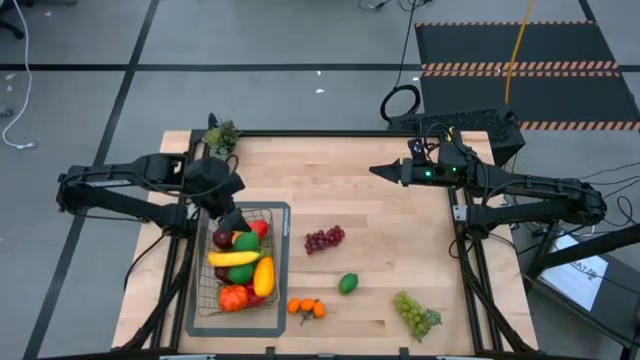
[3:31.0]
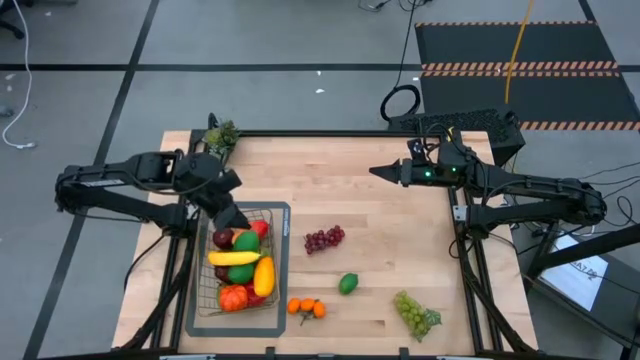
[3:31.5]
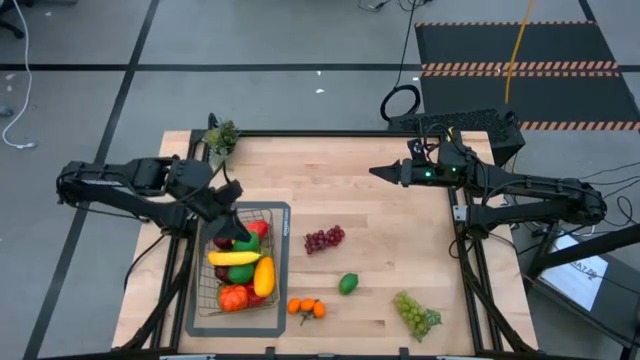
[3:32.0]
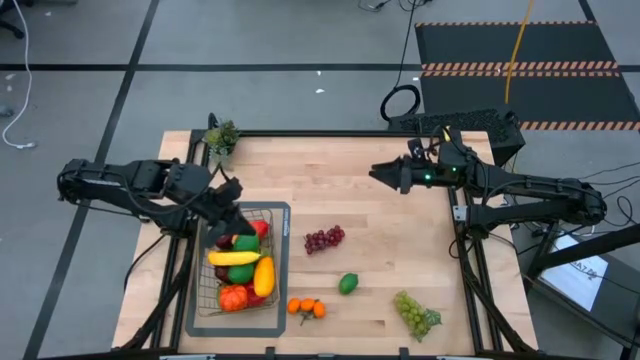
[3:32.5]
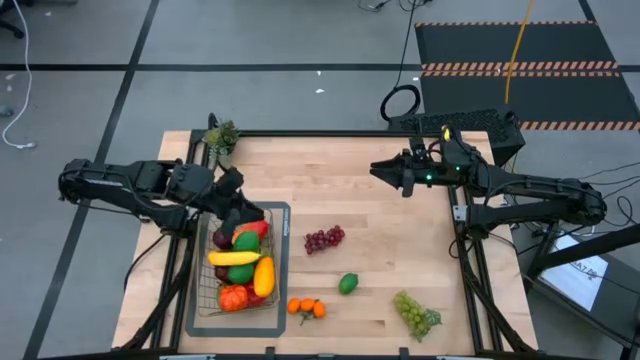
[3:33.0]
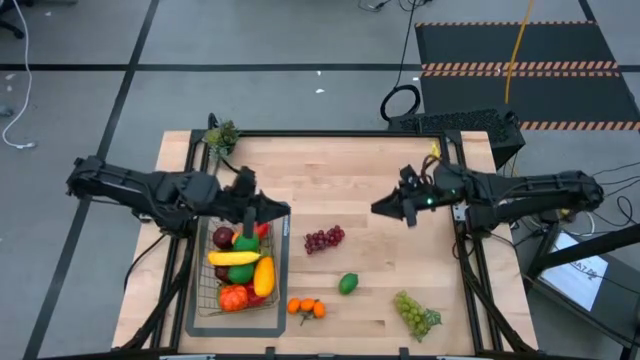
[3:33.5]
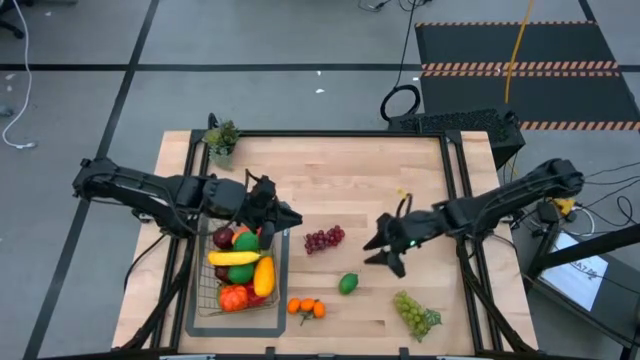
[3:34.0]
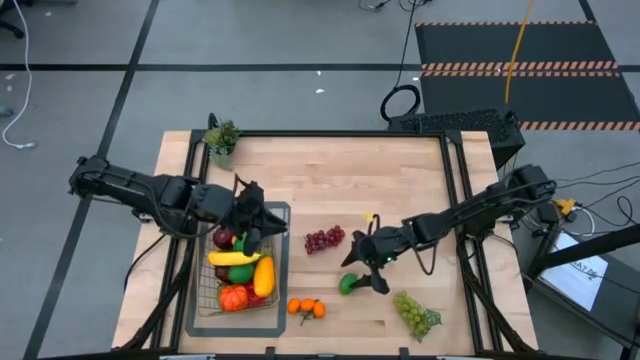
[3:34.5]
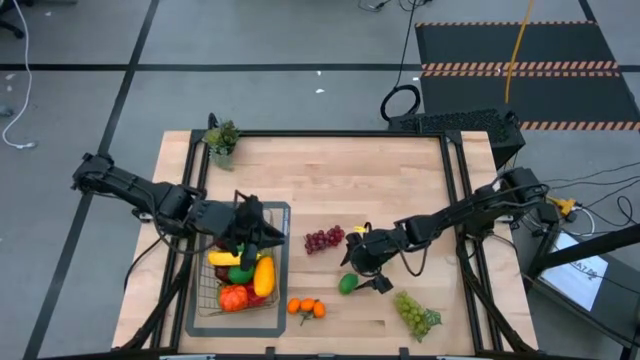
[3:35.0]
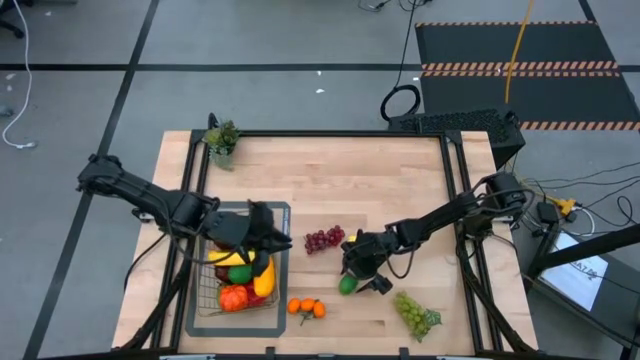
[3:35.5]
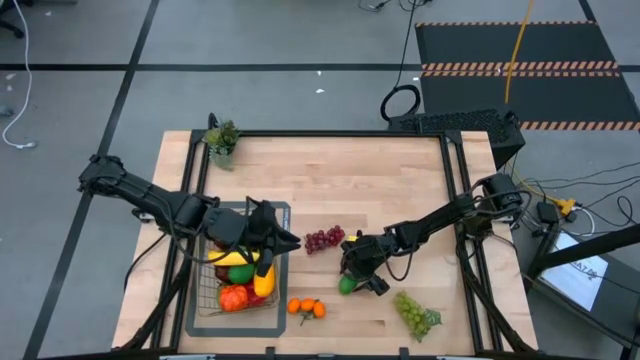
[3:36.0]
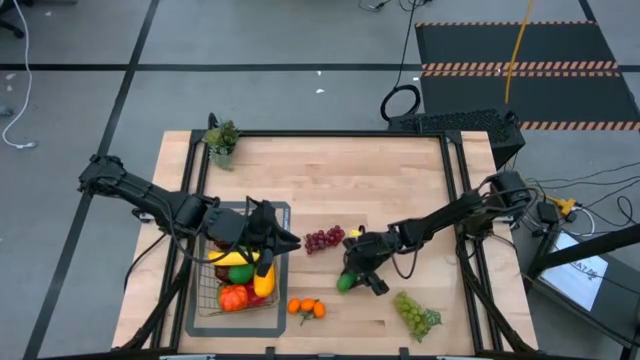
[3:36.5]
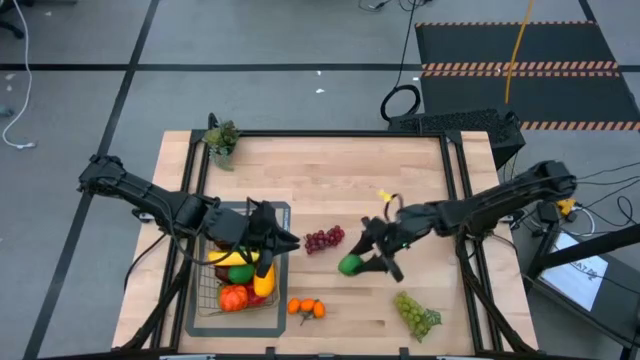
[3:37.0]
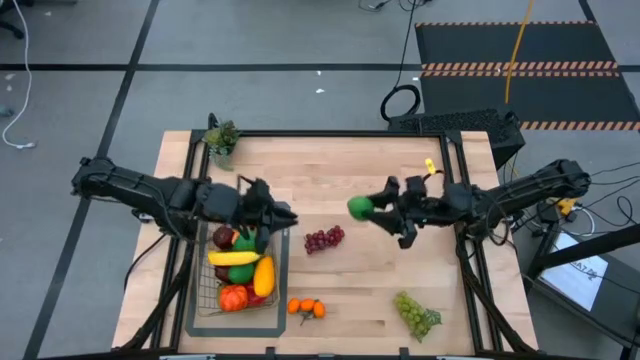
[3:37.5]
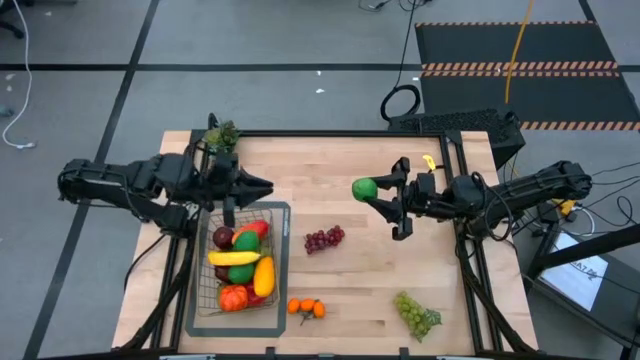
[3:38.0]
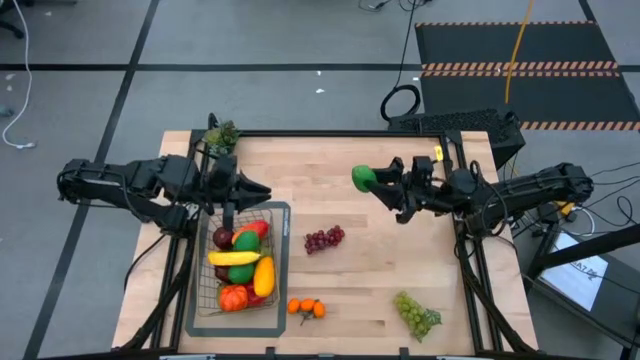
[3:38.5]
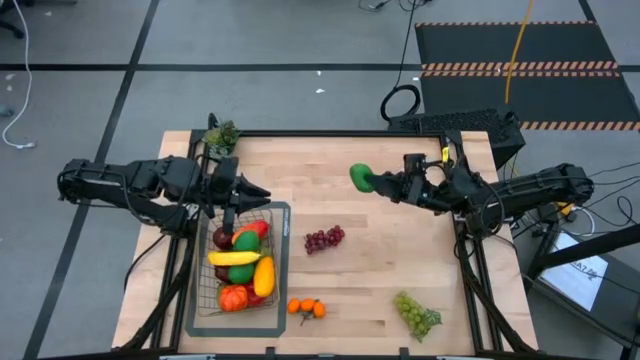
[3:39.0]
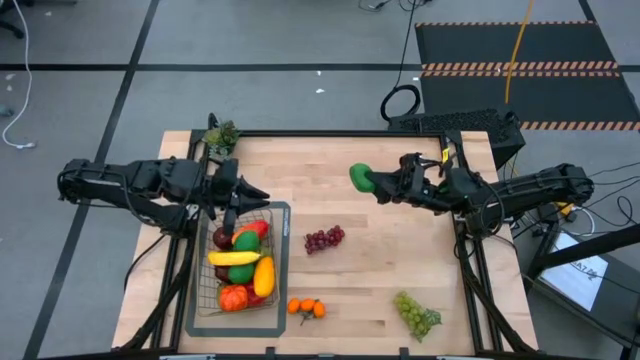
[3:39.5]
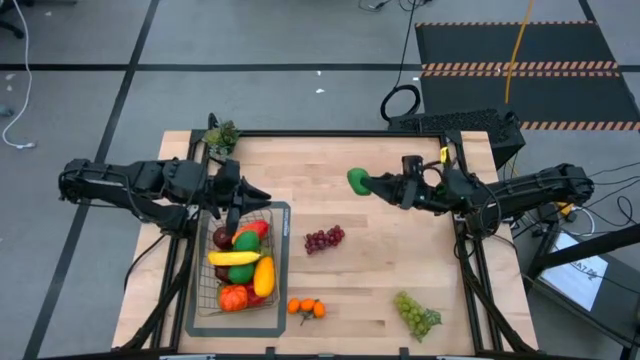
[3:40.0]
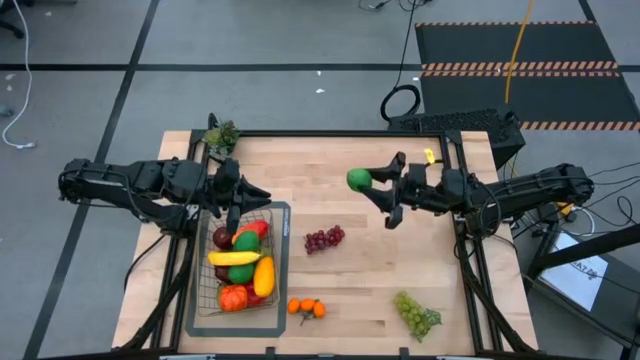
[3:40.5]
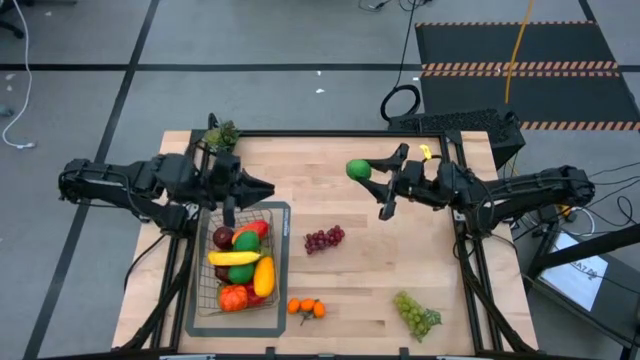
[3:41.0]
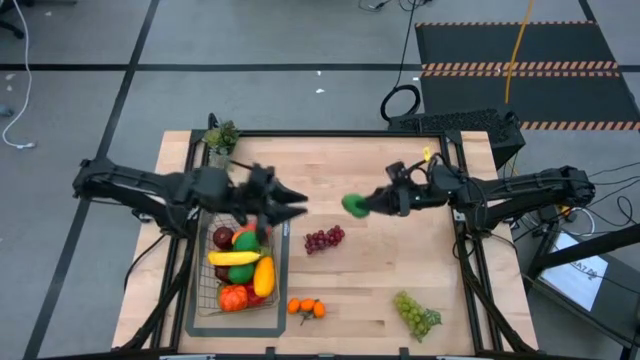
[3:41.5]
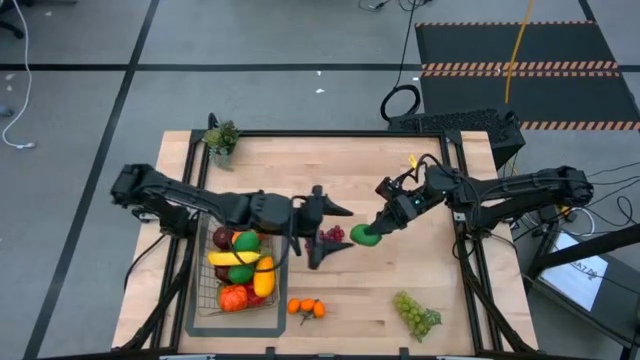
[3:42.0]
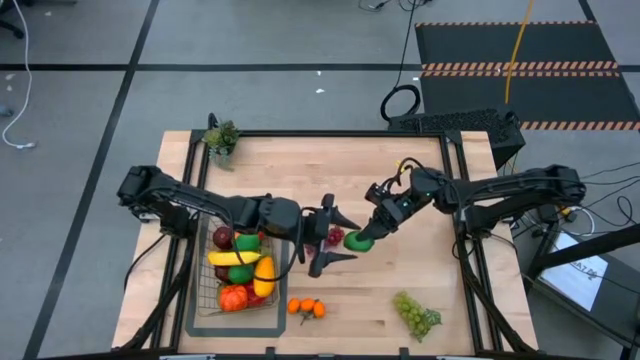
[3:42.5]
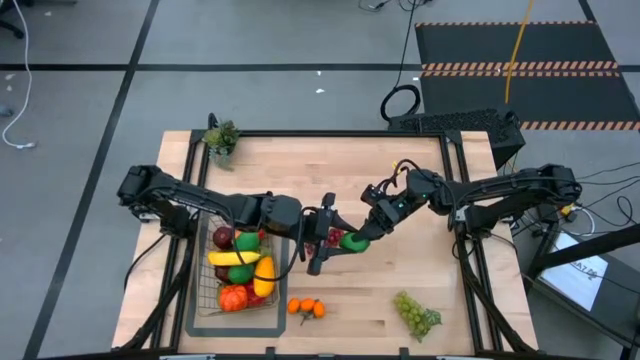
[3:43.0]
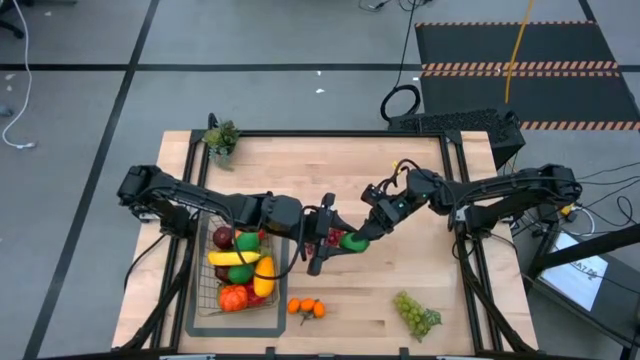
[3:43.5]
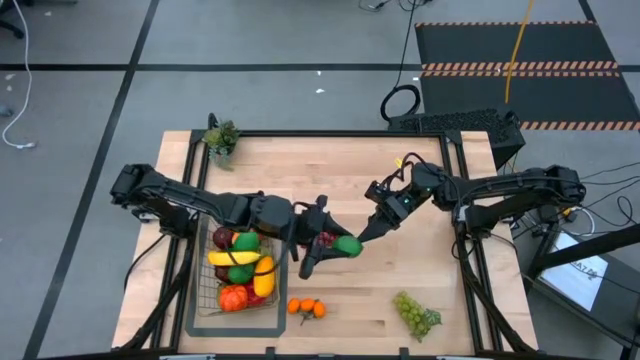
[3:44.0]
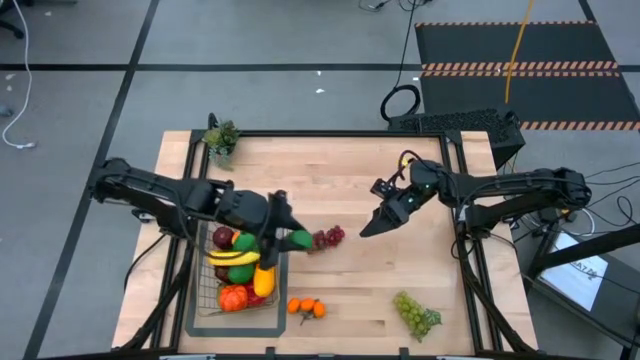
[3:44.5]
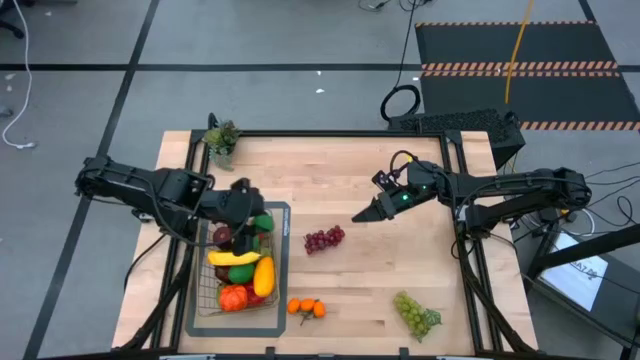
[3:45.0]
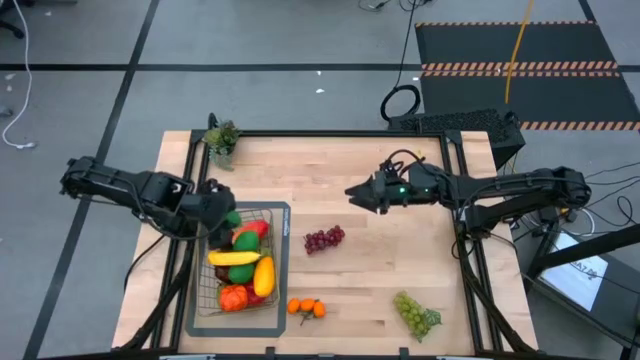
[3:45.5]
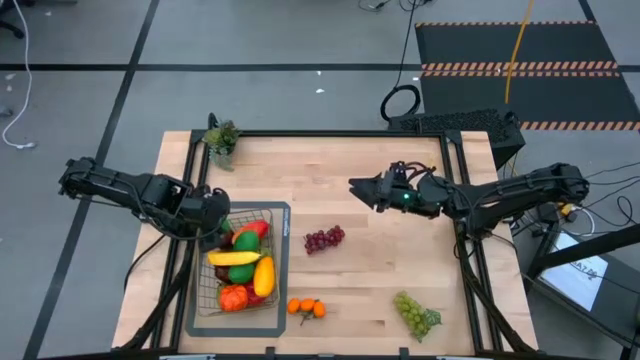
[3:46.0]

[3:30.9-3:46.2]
Task: Build produce basket
Put the green lime into the wire basket

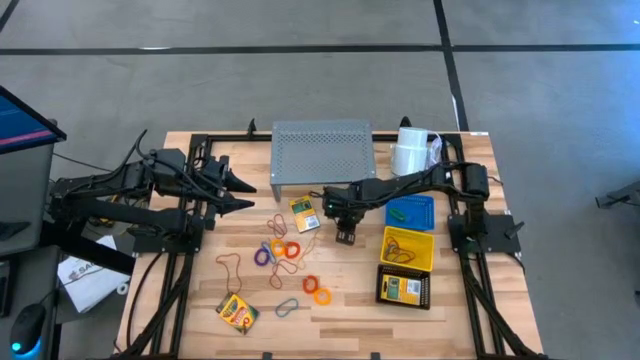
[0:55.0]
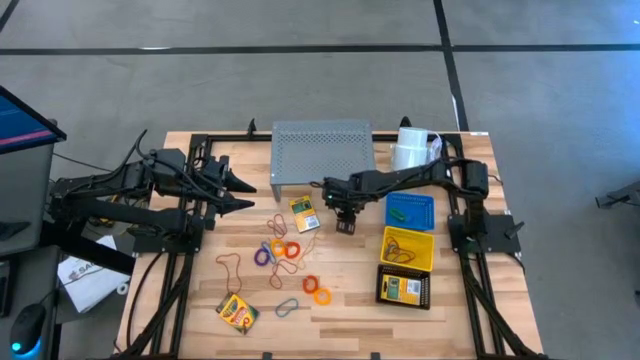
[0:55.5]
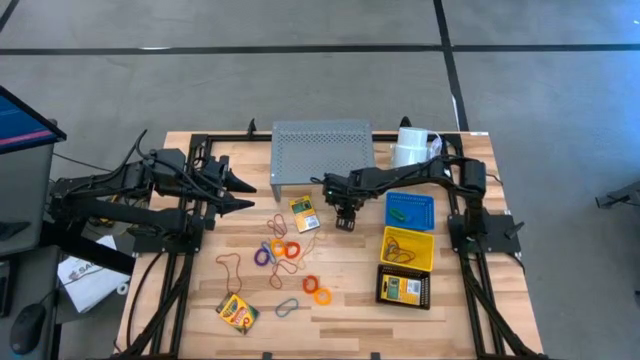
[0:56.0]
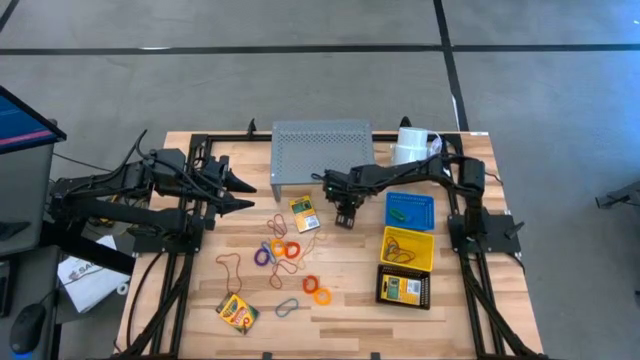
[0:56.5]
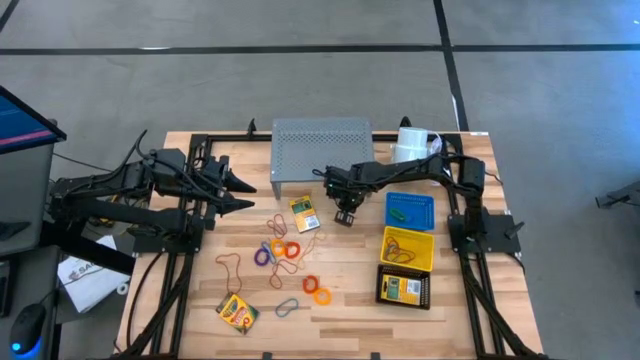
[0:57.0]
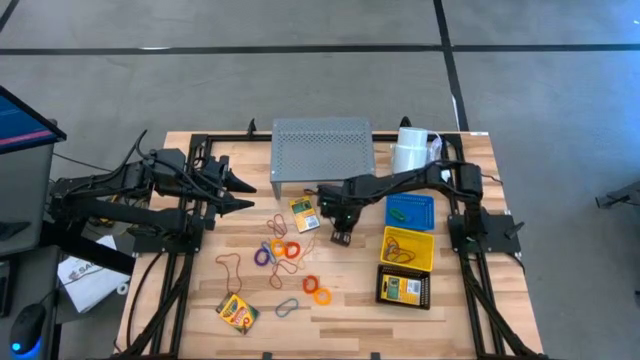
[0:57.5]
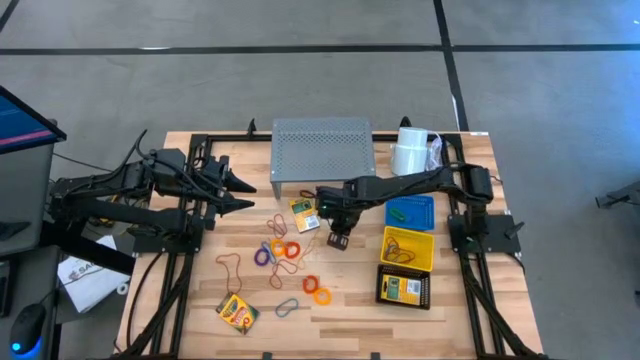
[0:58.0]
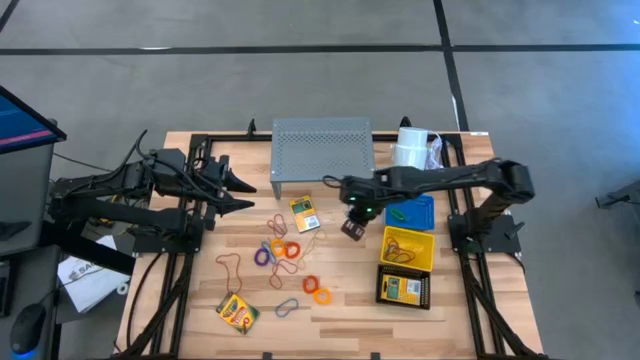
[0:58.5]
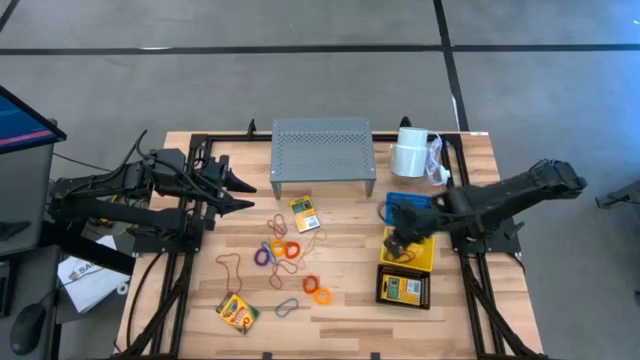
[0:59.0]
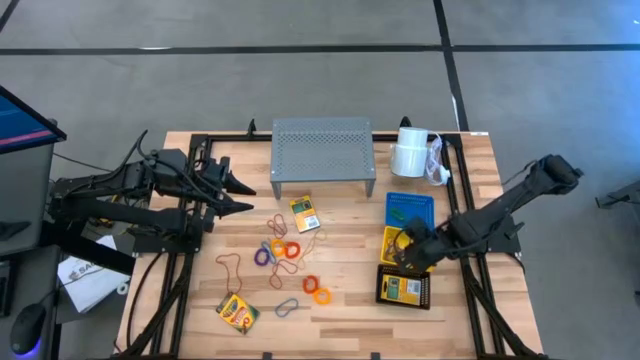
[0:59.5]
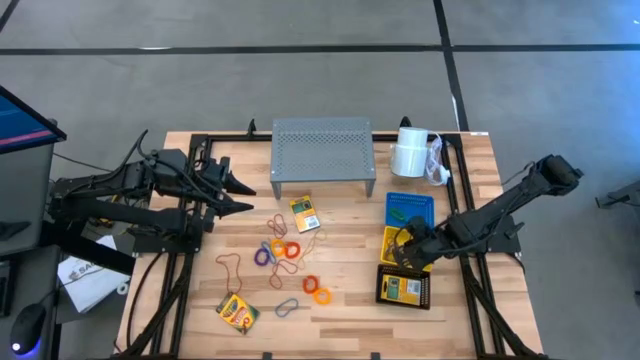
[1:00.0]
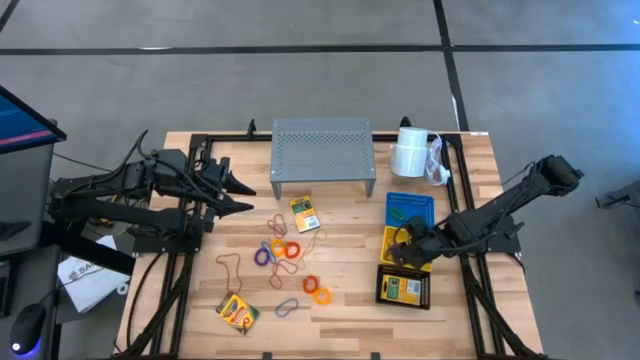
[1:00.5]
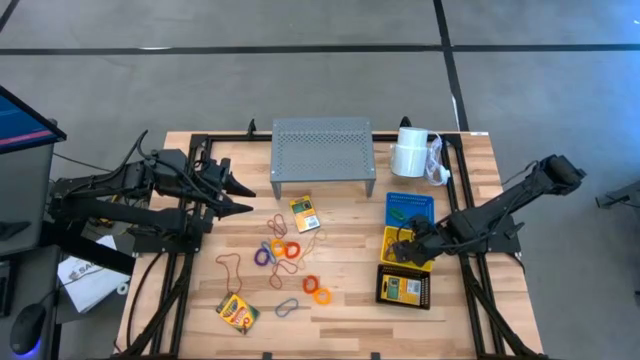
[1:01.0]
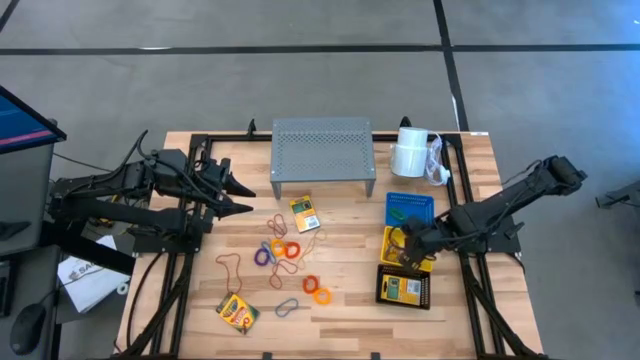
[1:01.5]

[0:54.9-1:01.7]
Task: Pick & Place Office Desk Supplies
Put the blue rubber band into the yellow basket
